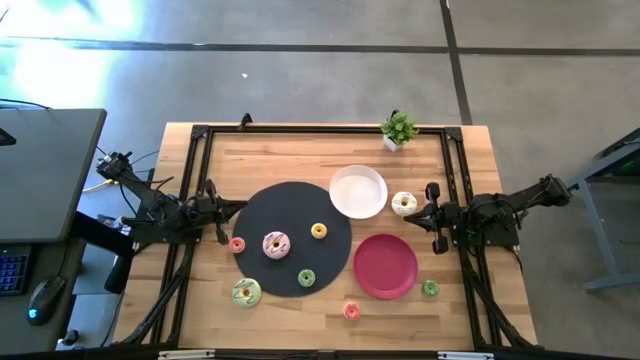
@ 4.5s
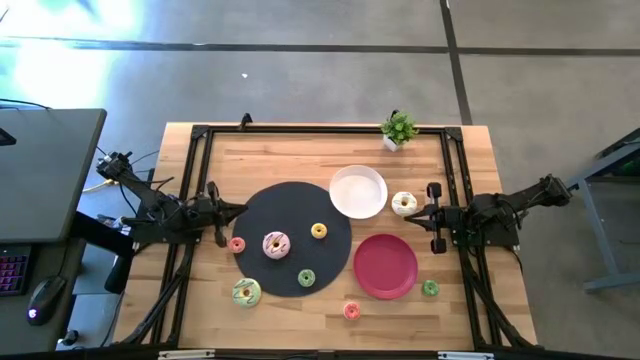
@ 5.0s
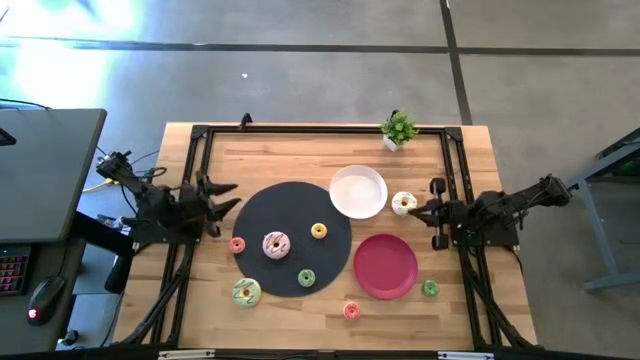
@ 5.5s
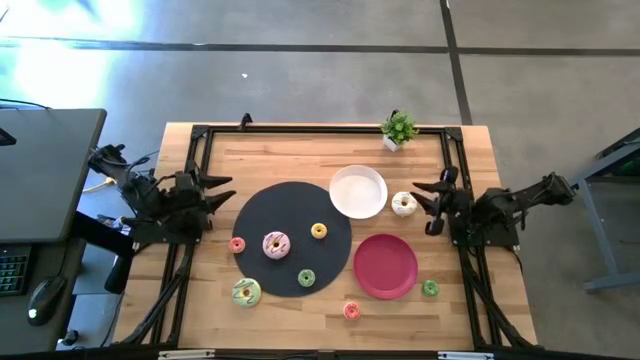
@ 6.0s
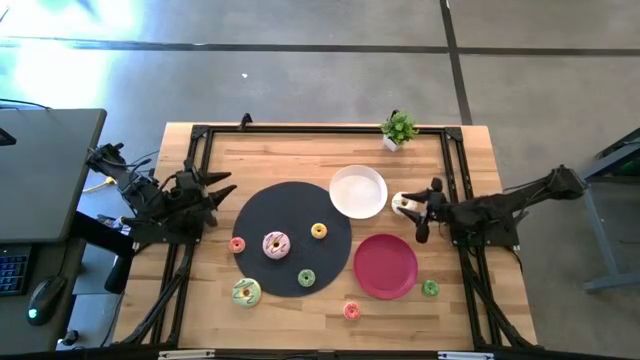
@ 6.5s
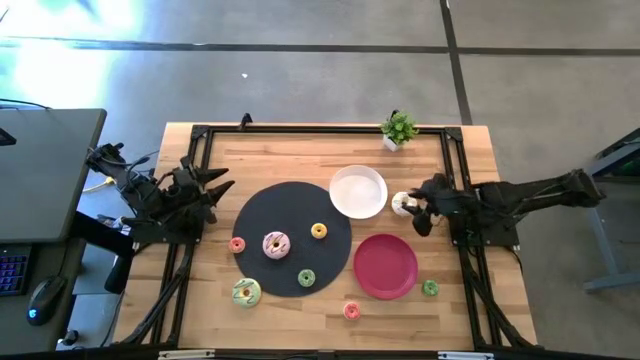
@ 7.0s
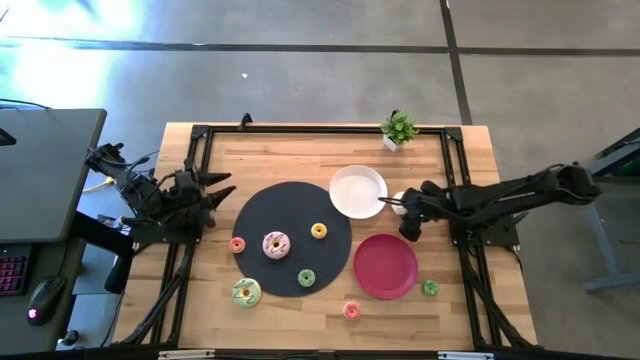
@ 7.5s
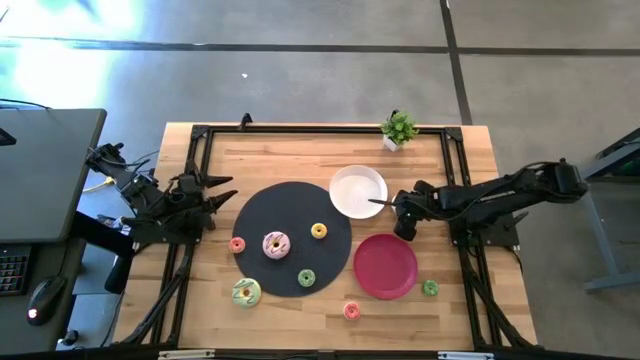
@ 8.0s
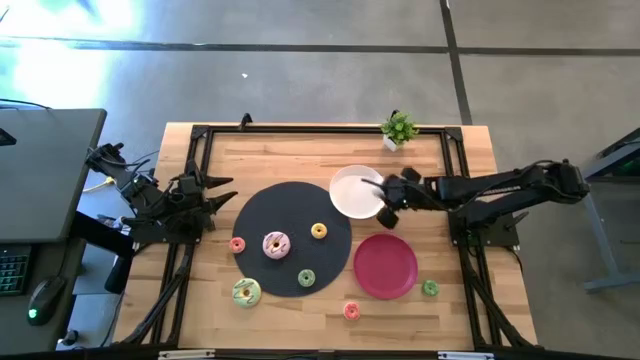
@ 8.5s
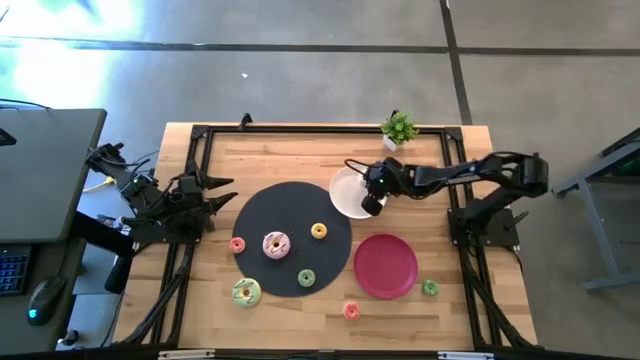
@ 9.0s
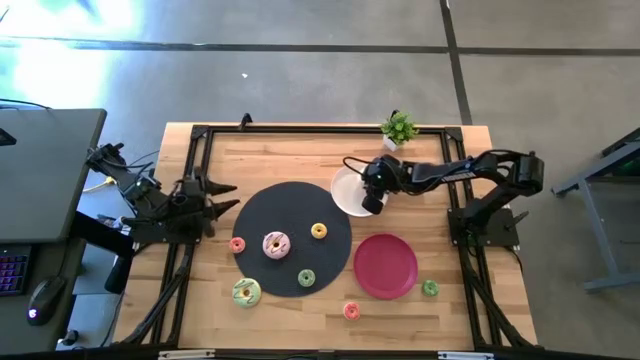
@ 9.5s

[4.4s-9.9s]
Task: Pick & Place donuts
Put the big white donut into the white plate

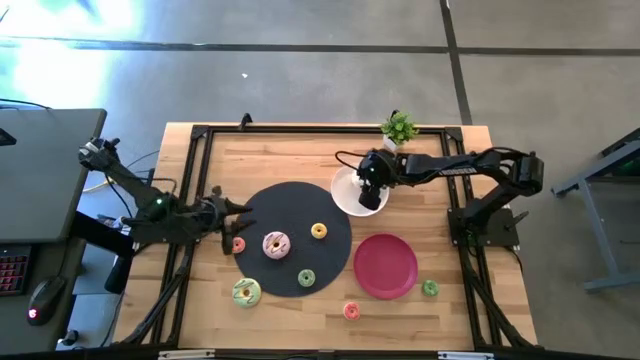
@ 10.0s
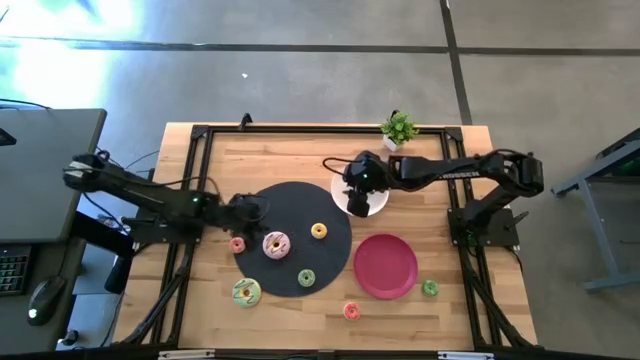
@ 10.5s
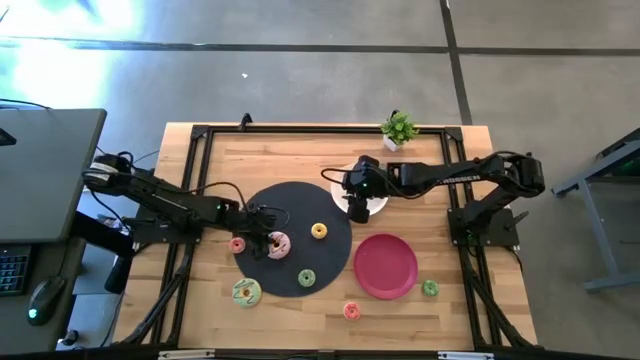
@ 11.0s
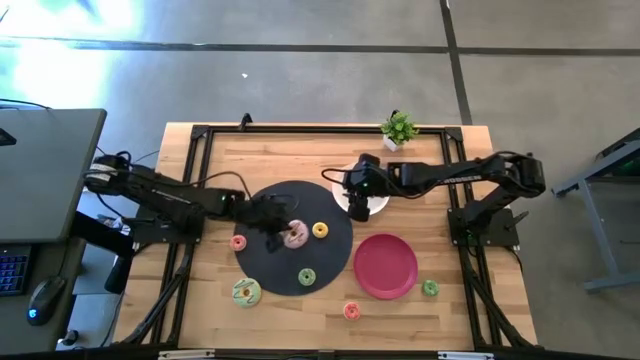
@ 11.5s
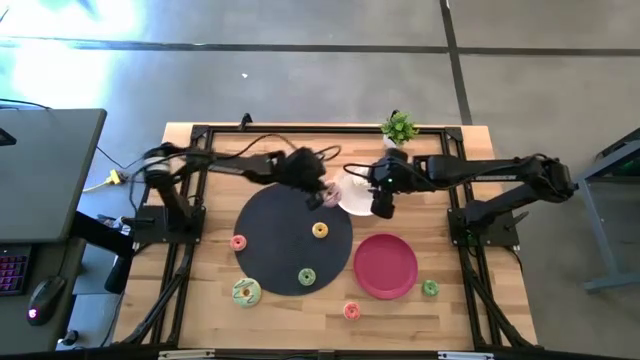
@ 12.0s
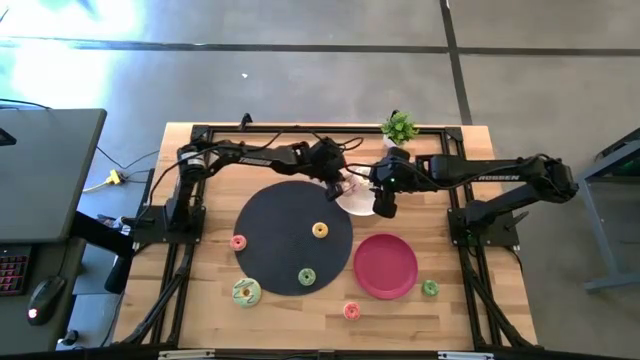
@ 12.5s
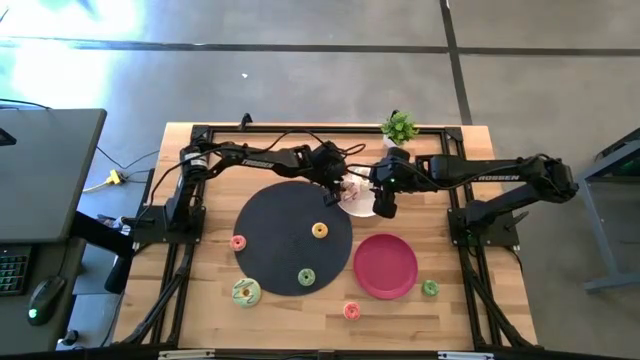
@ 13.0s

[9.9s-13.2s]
Put the big purple donut into the white plate

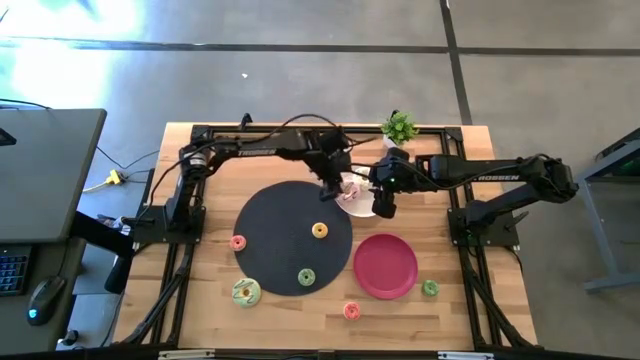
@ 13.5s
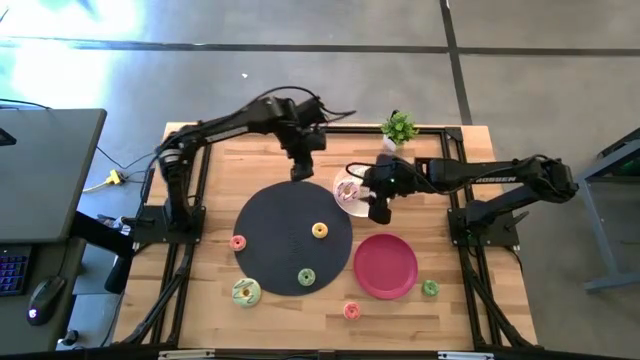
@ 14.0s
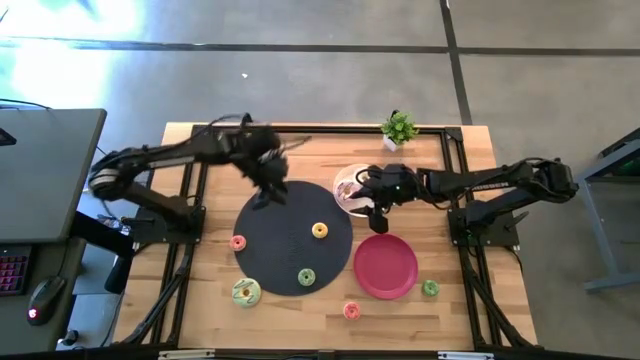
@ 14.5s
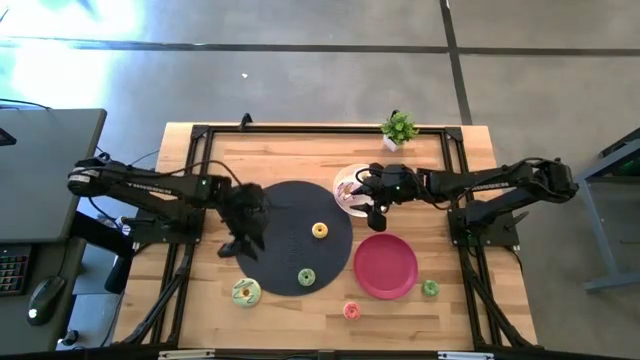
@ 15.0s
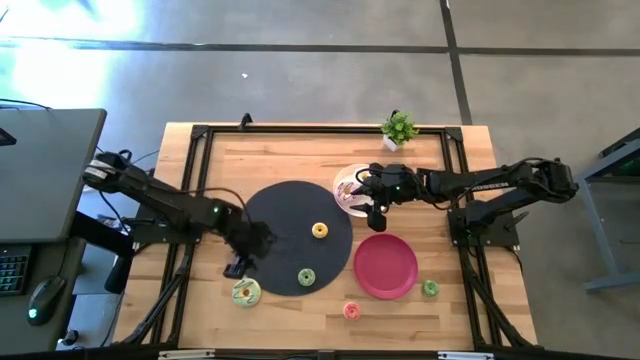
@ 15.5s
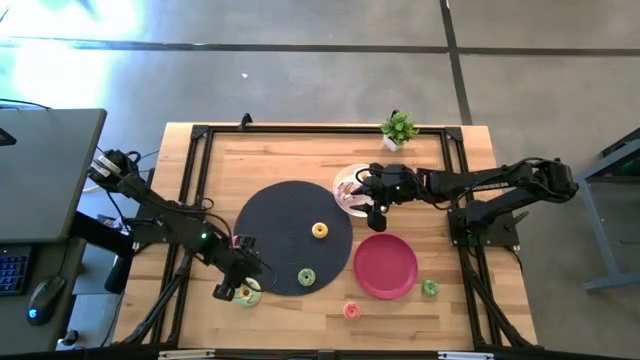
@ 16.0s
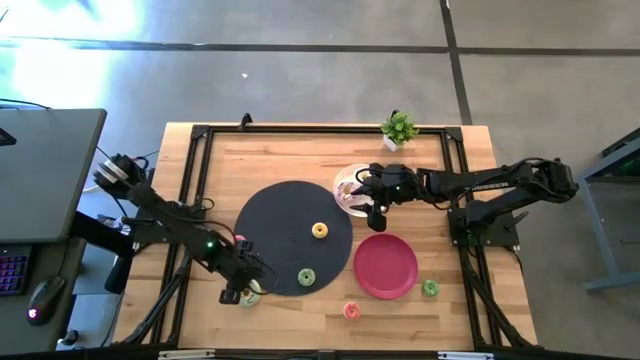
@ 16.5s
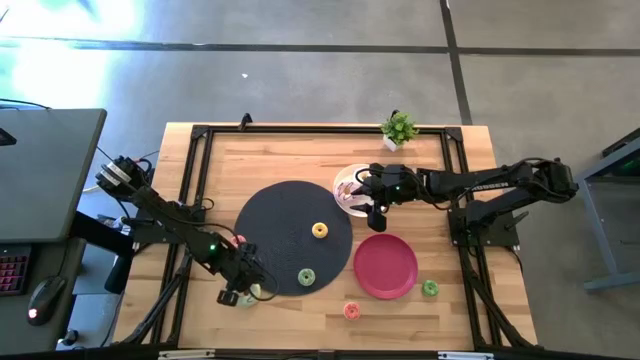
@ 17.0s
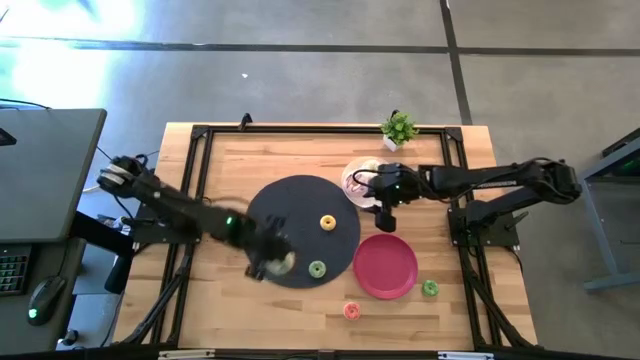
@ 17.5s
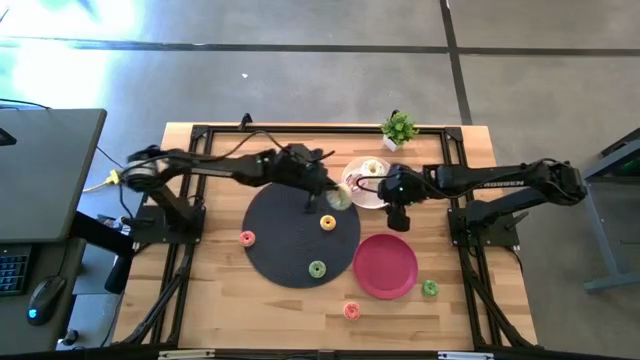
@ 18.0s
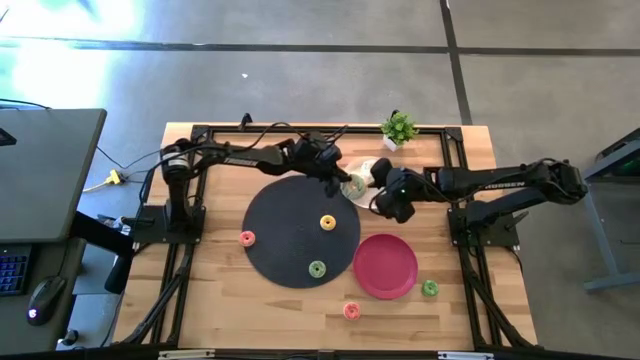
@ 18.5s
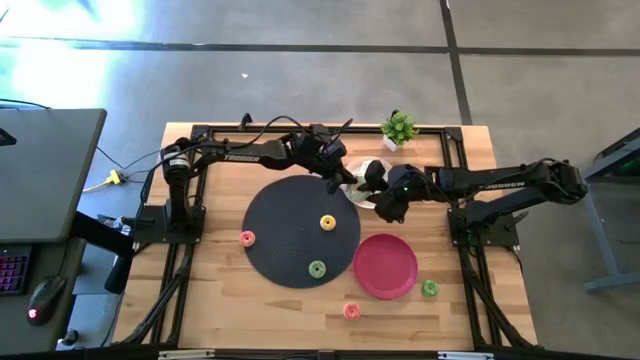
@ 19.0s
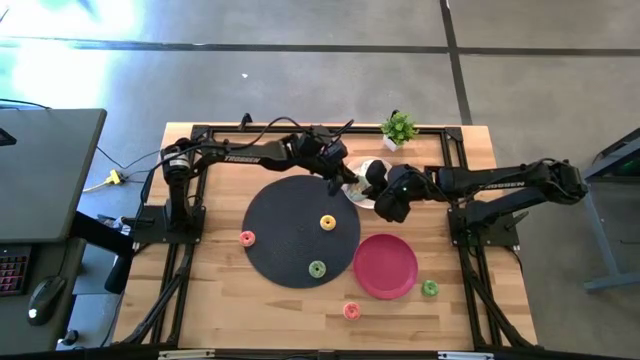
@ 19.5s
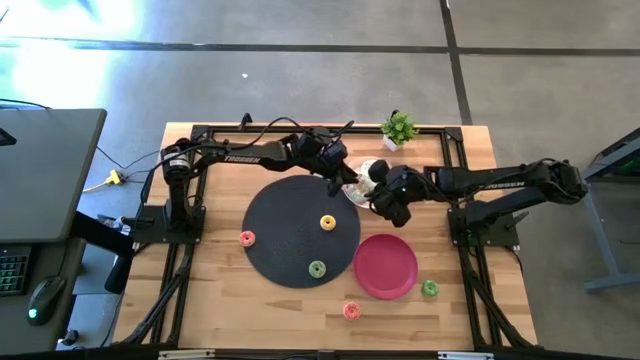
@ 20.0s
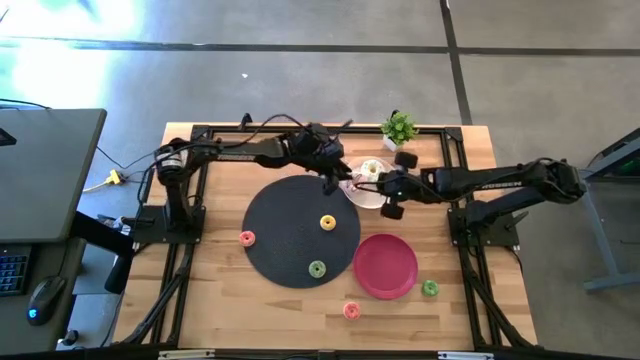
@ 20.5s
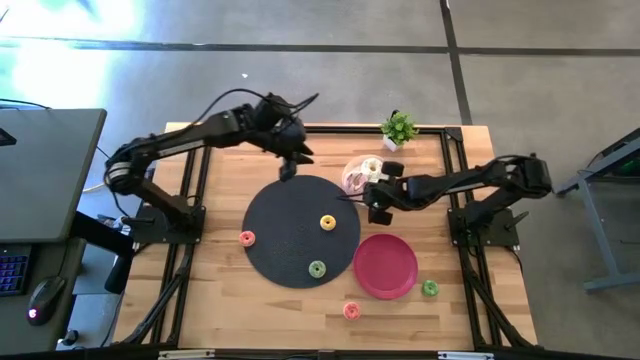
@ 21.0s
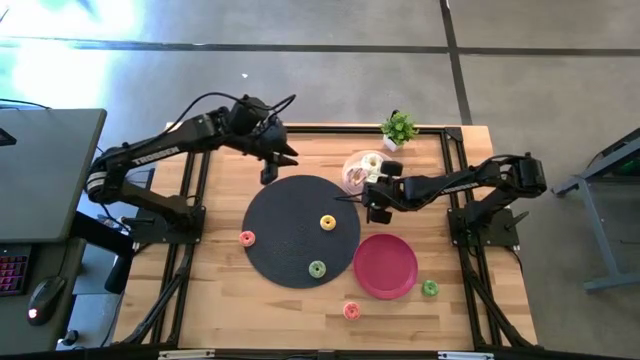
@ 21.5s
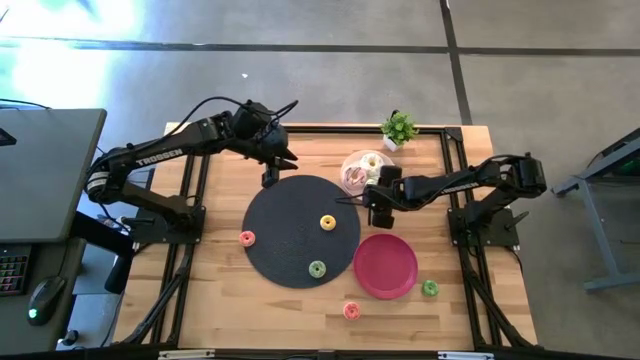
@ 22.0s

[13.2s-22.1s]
Put the big green donut into the white plate

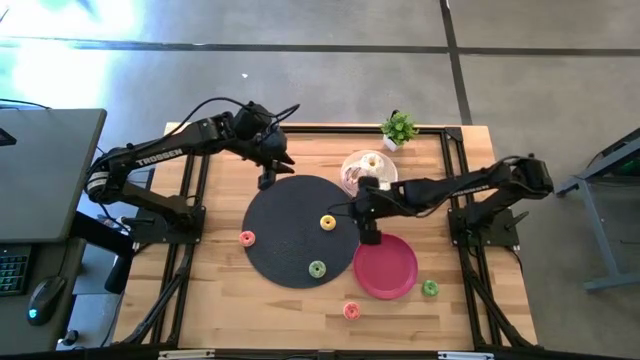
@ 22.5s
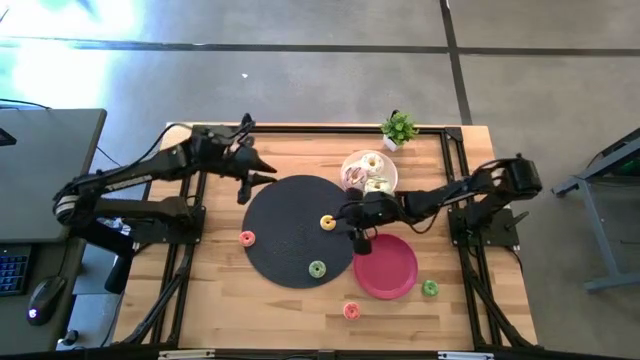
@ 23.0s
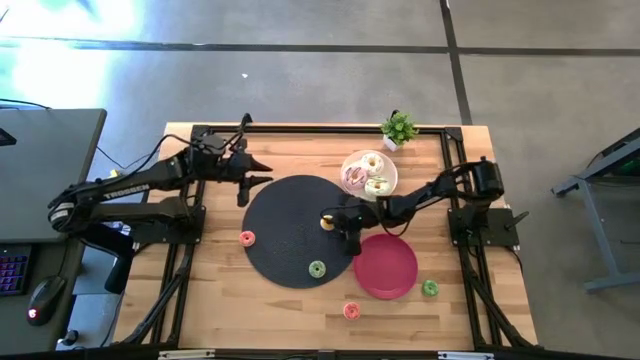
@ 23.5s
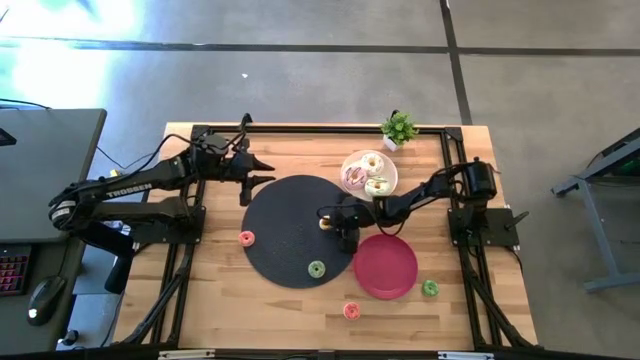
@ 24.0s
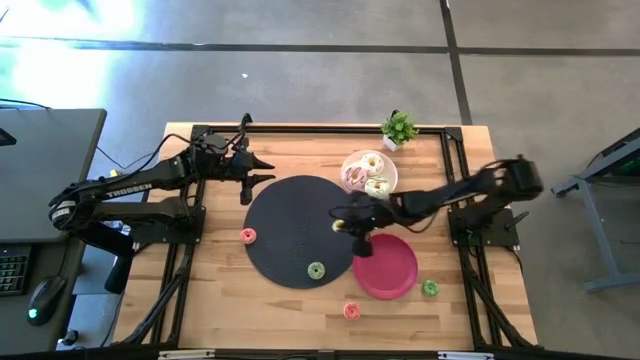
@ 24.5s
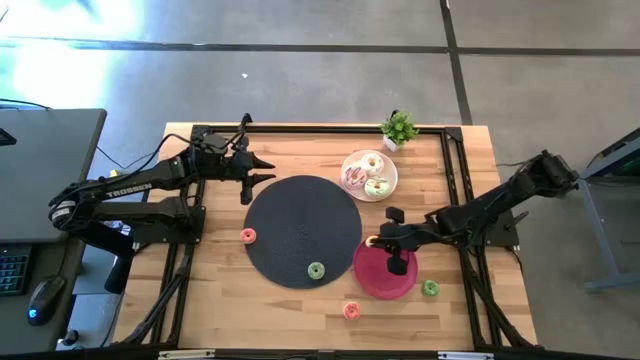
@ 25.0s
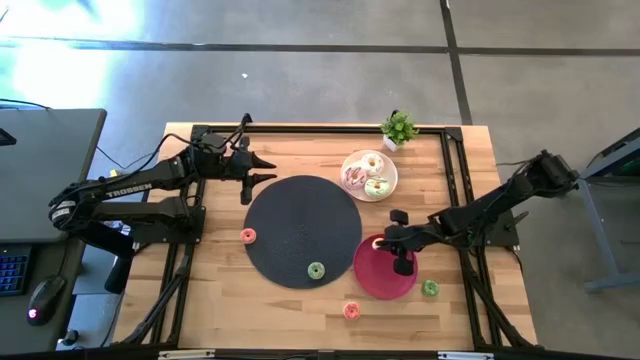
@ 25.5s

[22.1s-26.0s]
Put the small yellow donut into the red plate
